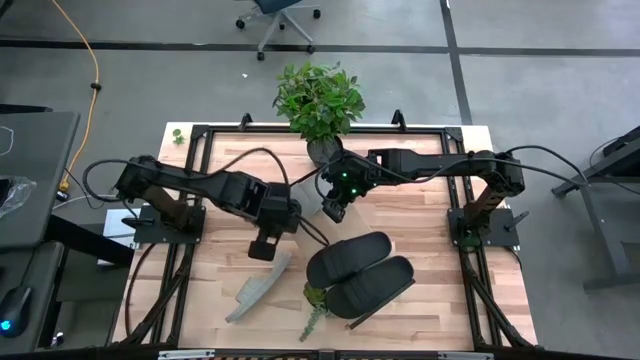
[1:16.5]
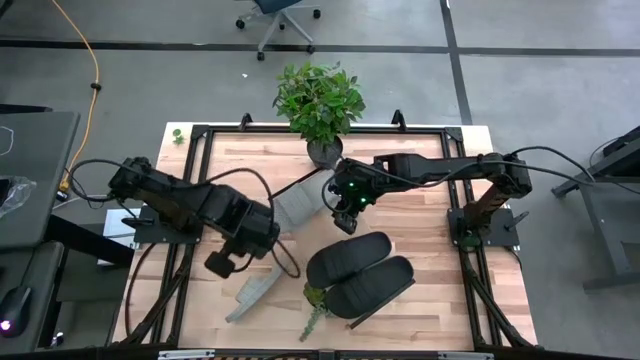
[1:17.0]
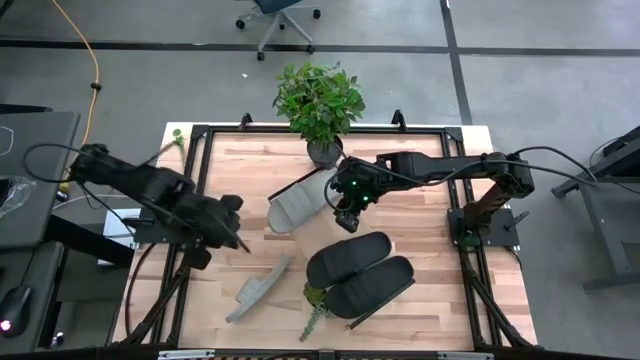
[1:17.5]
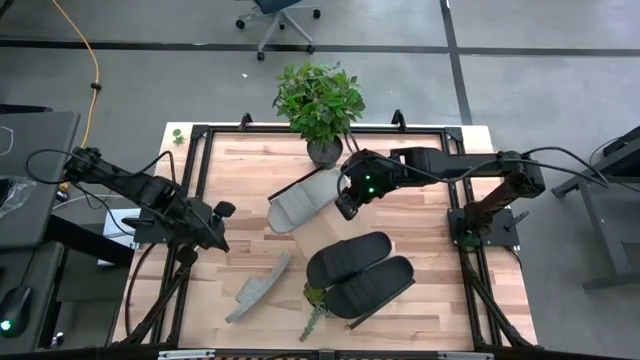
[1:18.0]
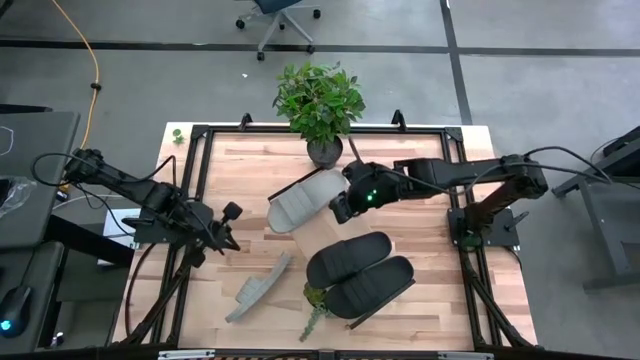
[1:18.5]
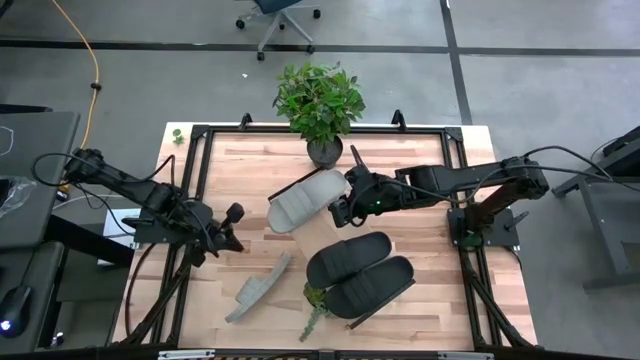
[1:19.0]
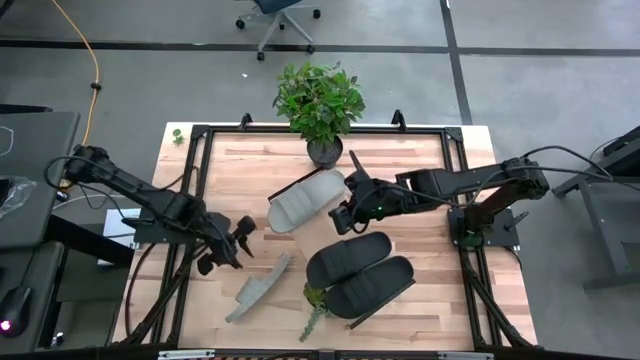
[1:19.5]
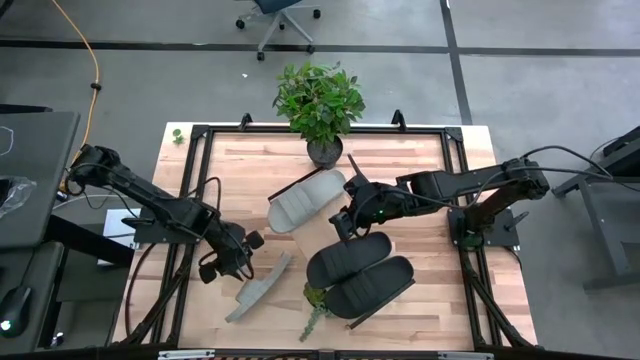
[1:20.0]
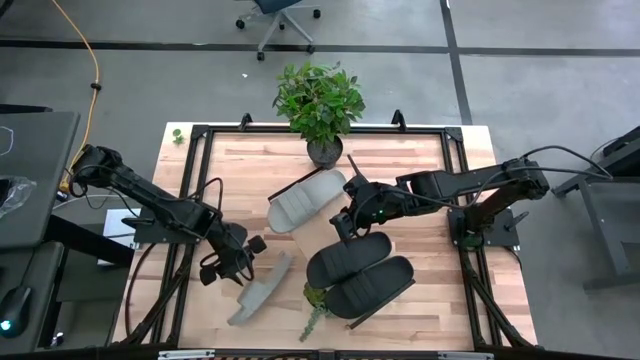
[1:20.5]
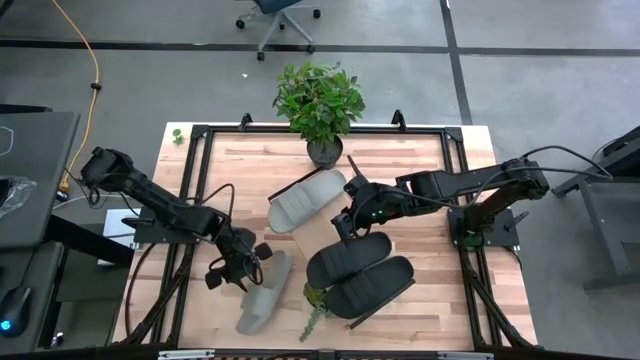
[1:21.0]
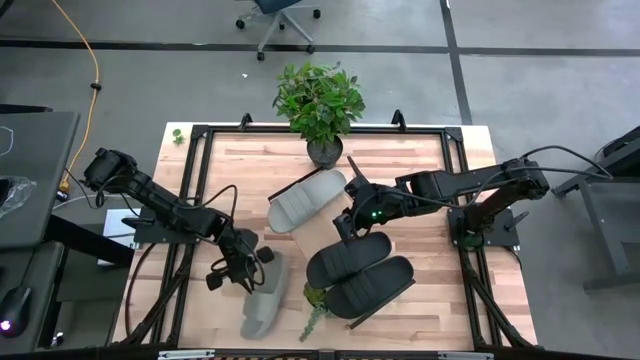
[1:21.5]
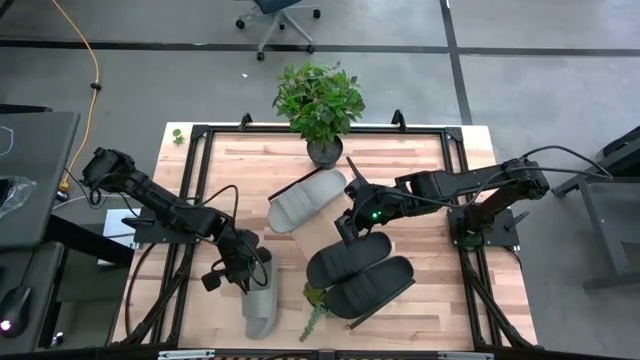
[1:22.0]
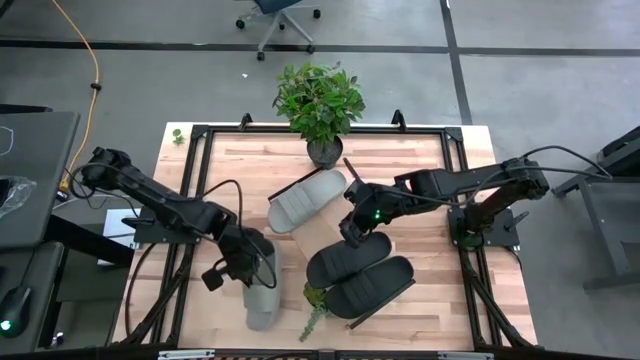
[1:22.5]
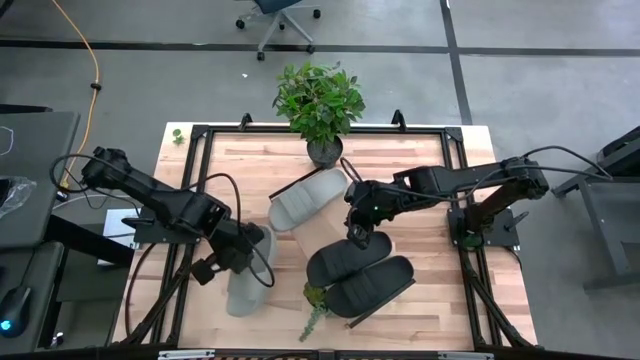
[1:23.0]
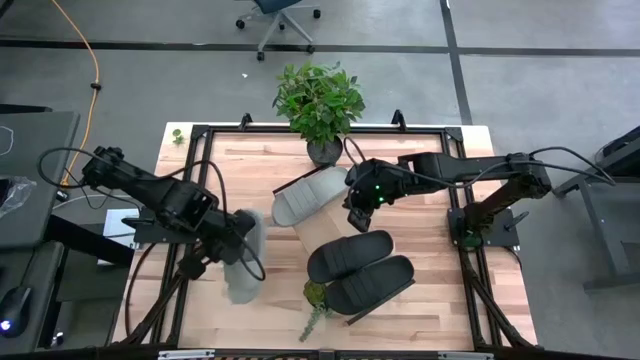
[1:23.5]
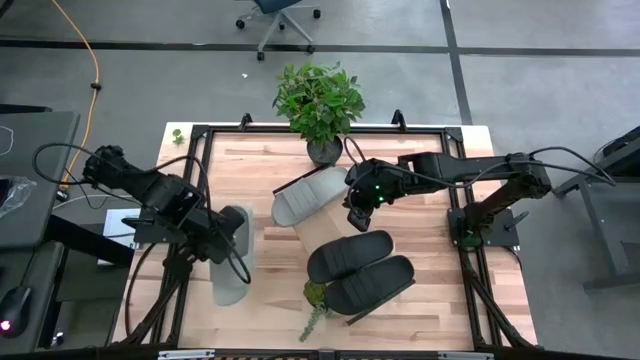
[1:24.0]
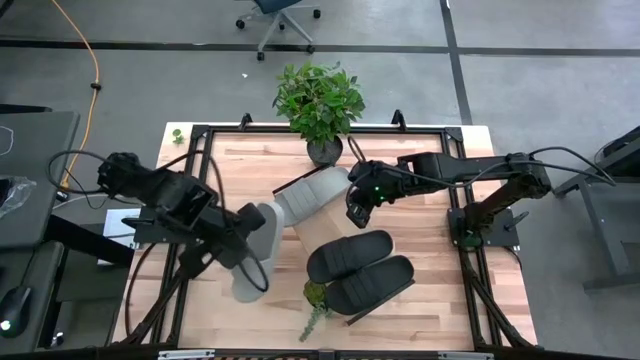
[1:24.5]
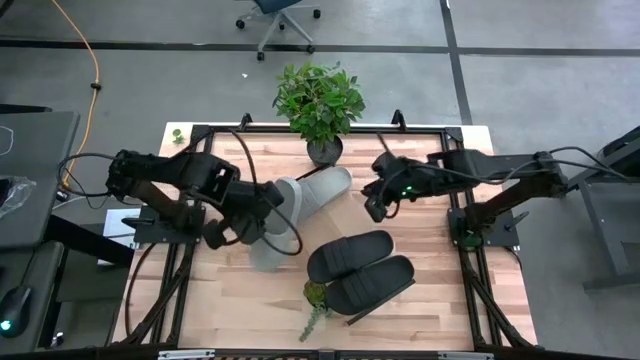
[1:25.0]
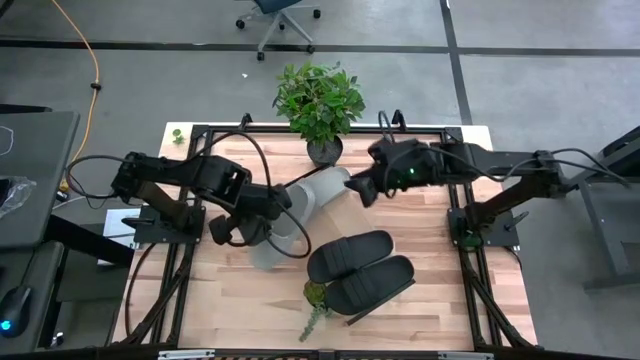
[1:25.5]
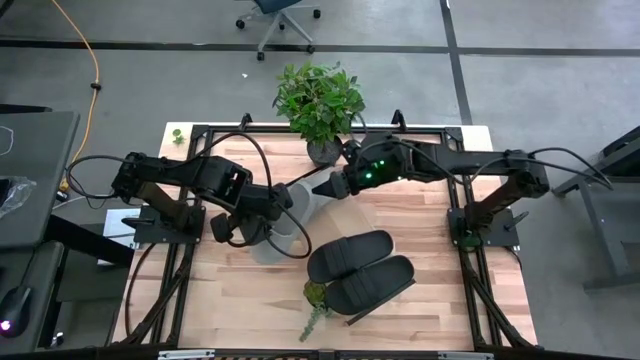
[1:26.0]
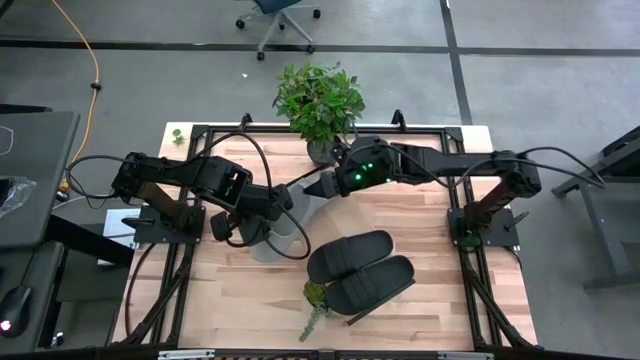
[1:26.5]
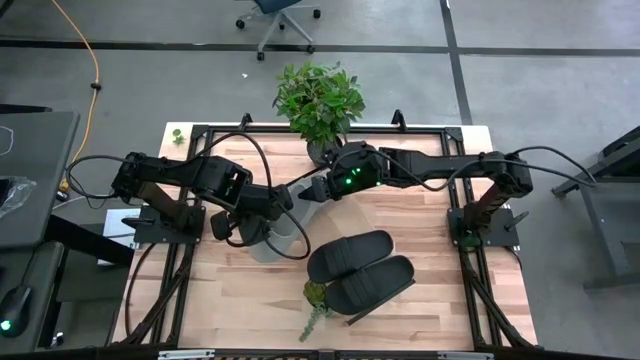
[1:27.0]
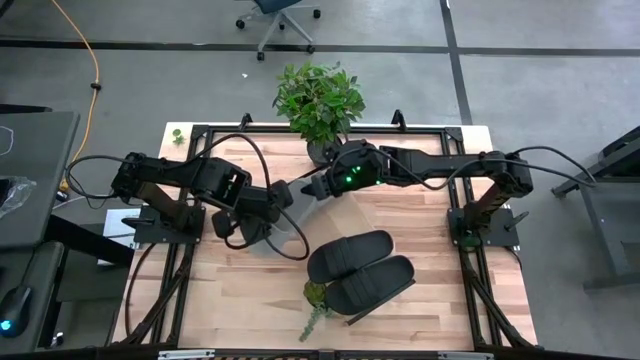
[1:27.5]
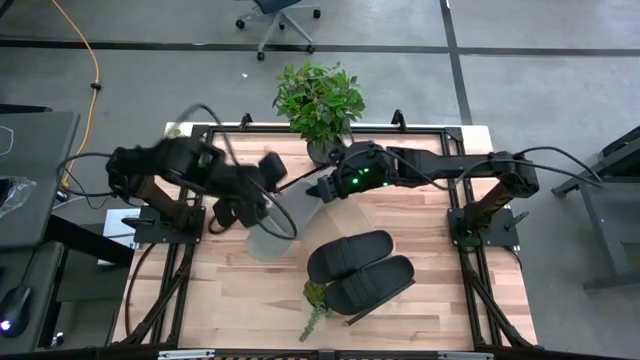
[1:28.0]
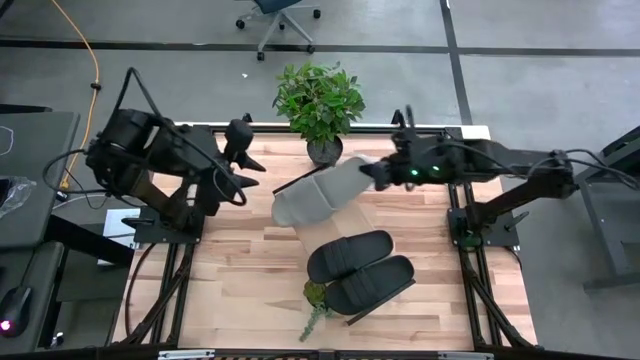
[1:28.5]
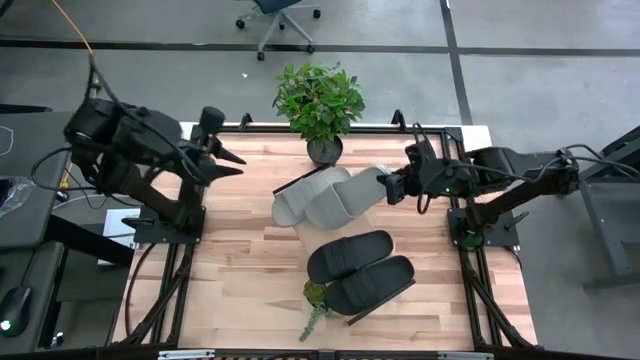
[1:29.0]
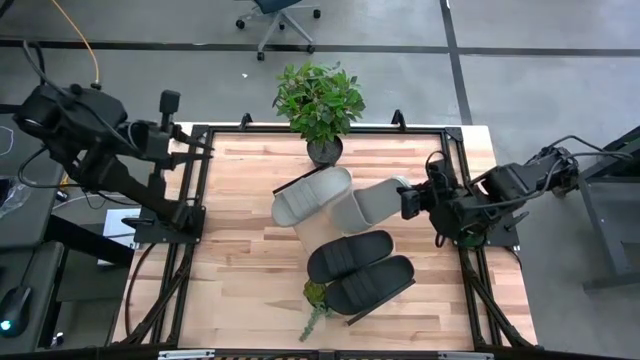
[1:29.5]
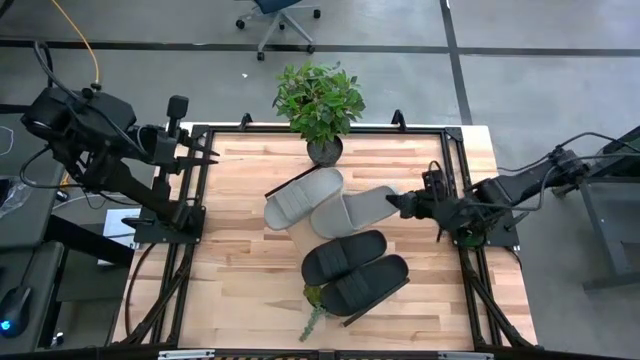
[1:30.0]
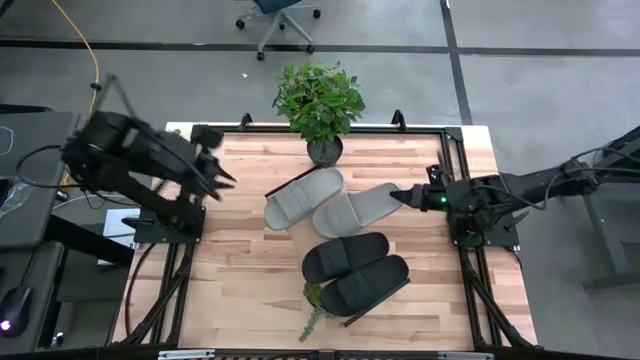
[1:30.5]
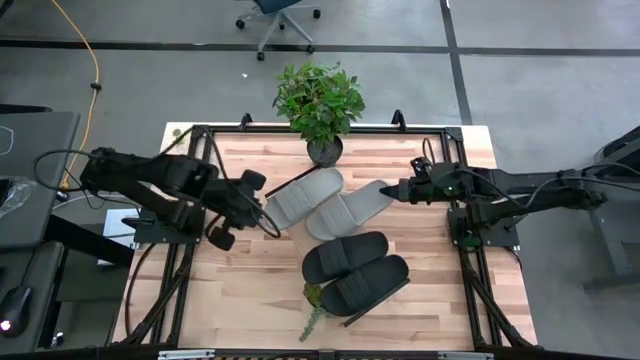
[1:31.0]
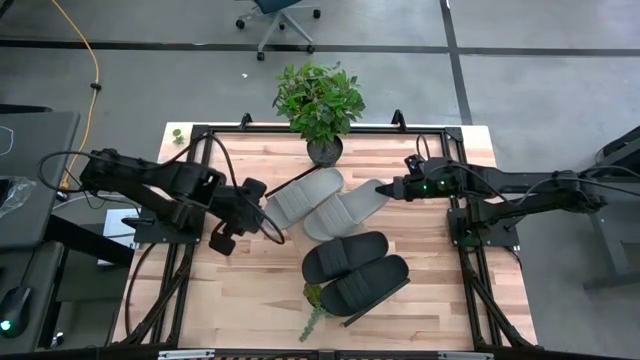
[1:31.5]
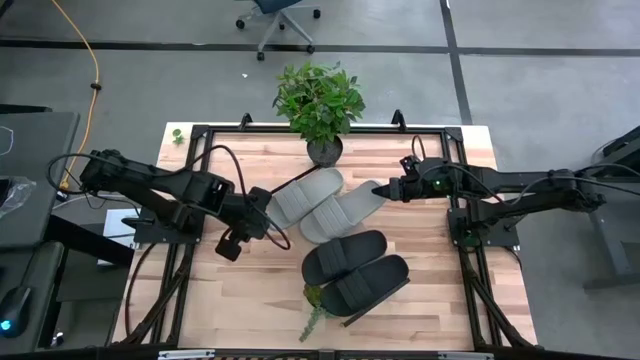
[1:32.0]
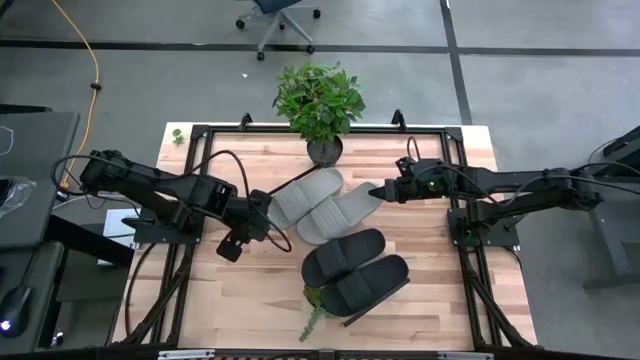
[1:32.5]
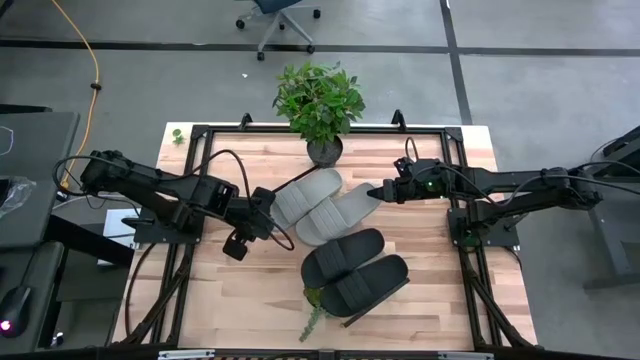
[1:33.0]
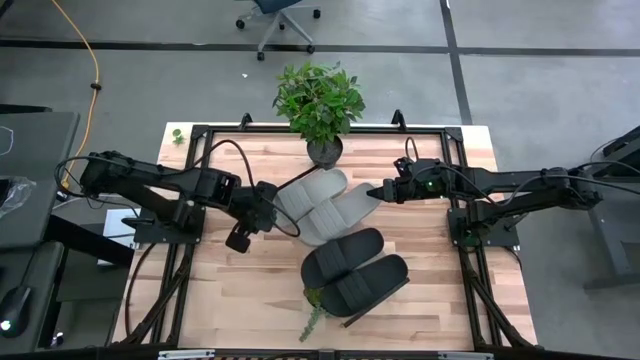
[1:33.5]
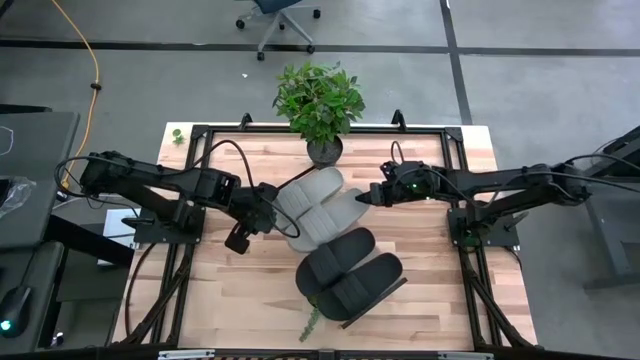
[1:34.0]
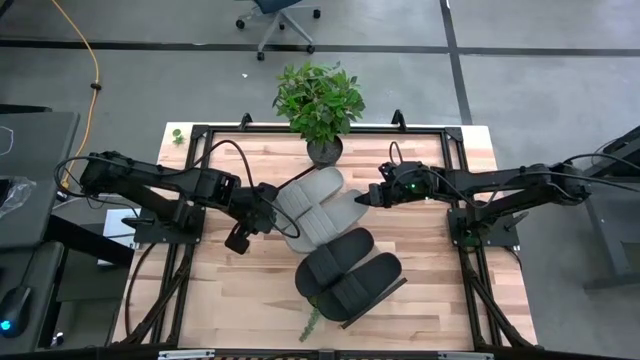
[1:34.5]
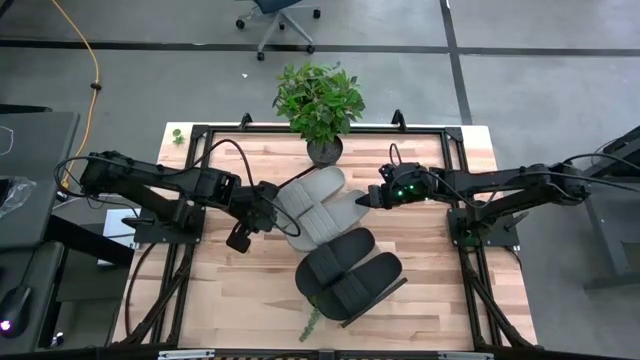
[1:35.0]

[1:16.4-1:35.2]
Task: Pick and place slides into the shelf
Put the gray slide on the shelf

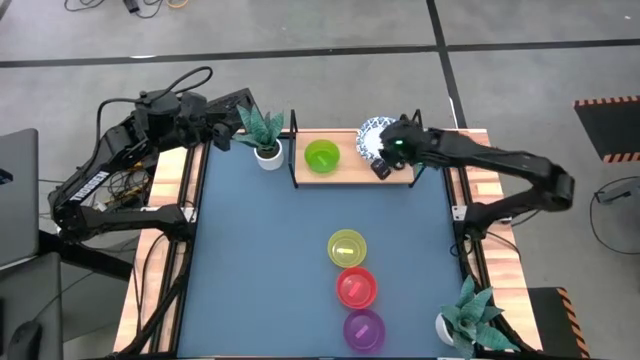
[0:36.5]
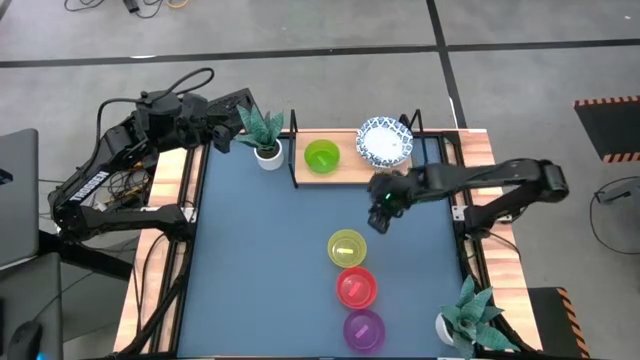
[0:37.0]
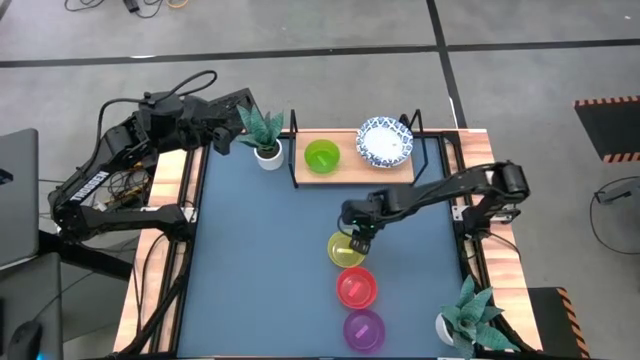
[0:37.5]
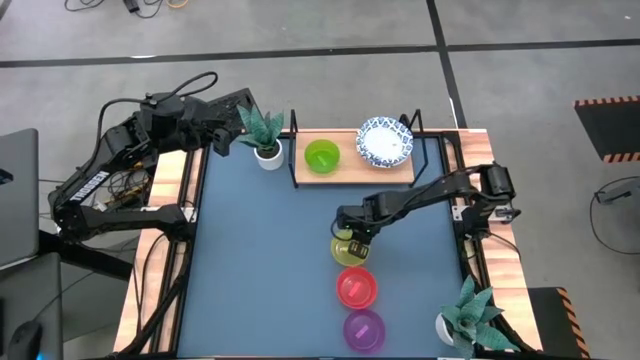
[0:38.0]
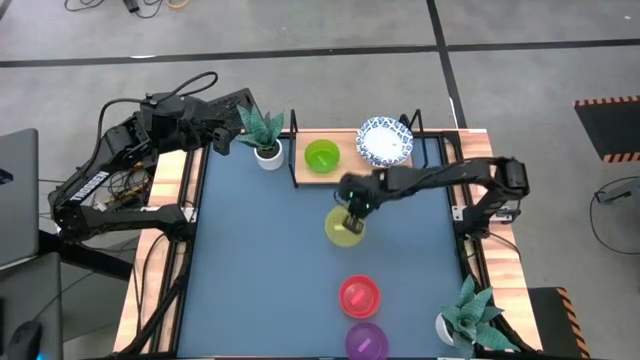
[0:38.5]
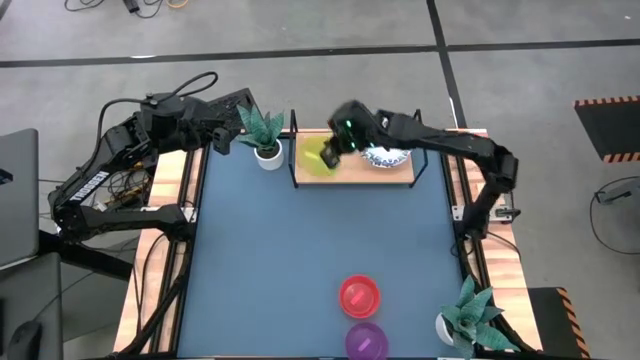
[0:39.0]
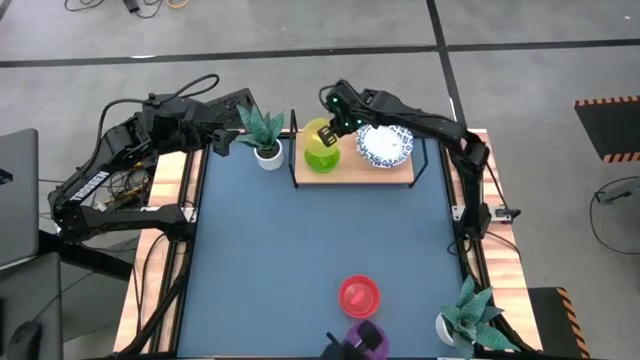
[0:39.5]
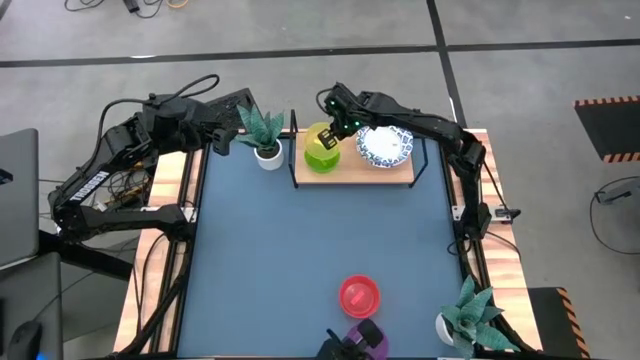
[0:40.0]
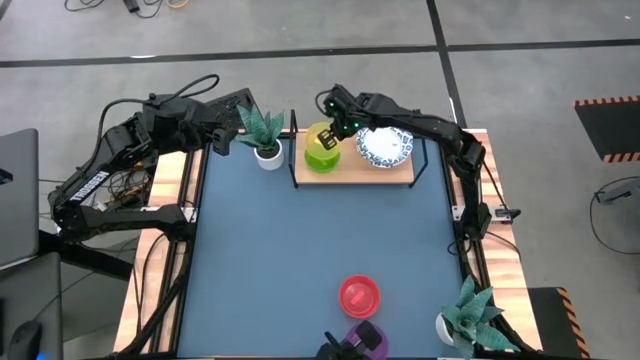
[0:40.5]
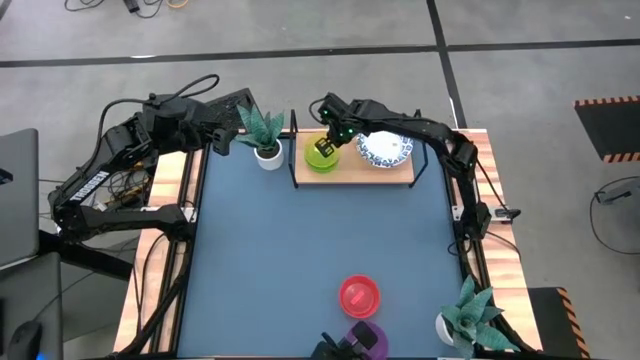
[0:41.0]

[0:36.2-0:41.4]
Task: Place and stack bowls onto a shelf
Stack the yellow transparent bowl on top of the green transparent bowl on the shelf
